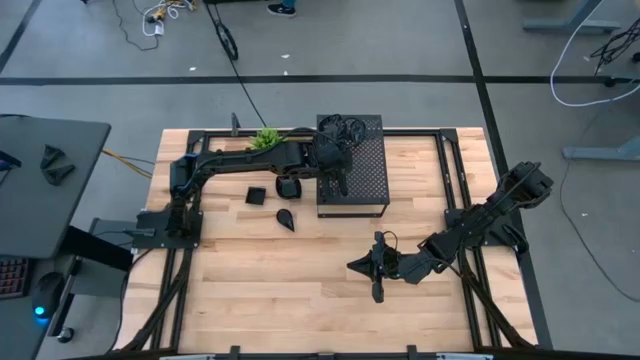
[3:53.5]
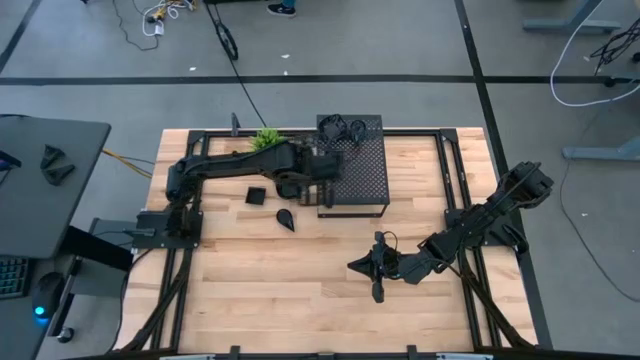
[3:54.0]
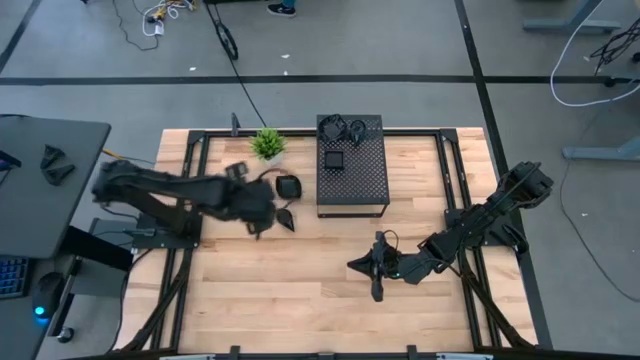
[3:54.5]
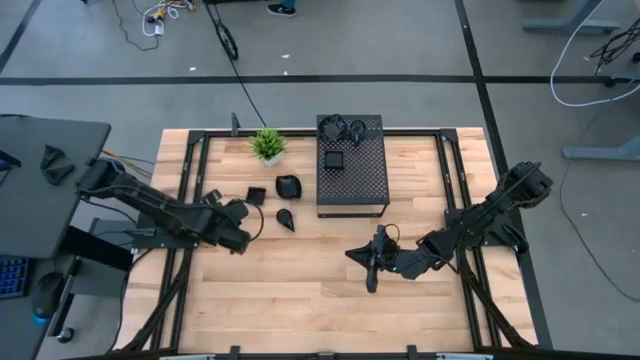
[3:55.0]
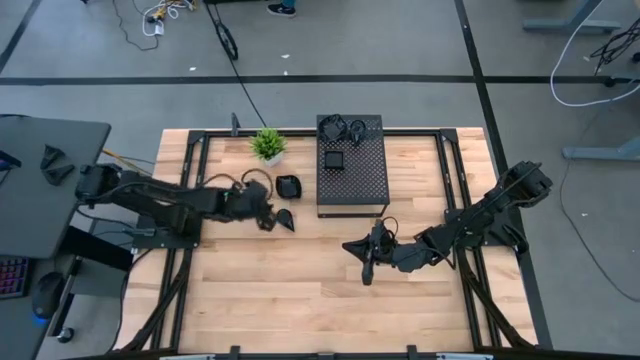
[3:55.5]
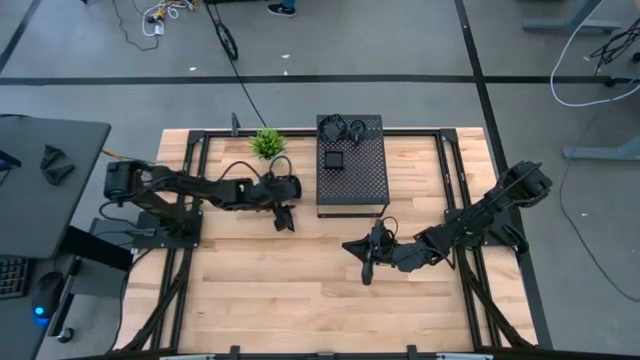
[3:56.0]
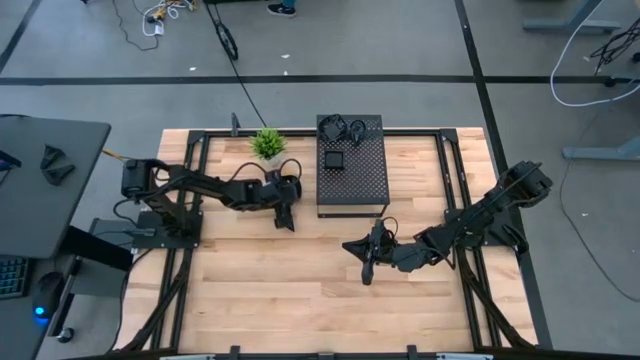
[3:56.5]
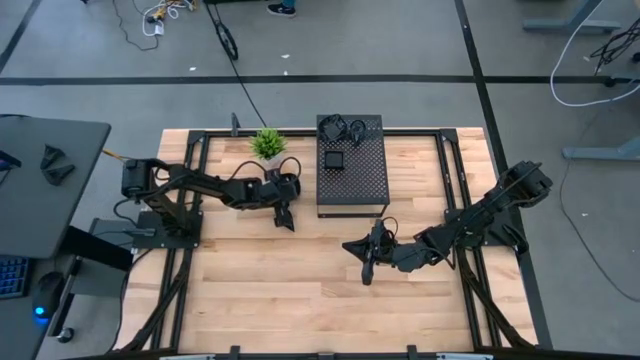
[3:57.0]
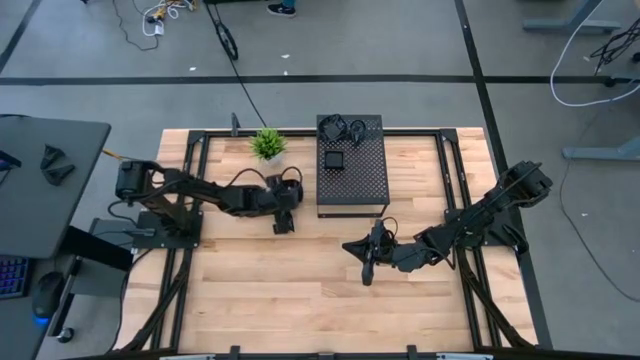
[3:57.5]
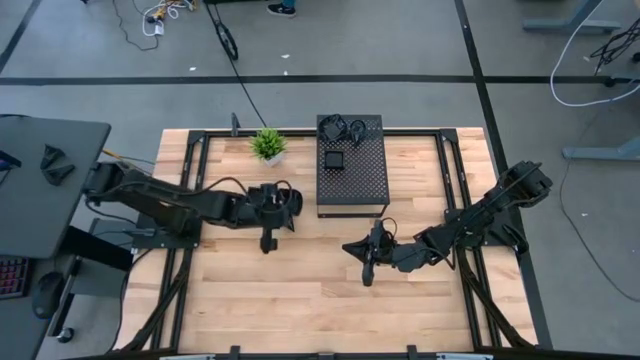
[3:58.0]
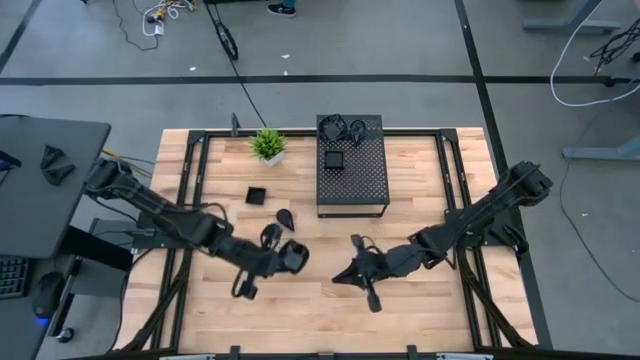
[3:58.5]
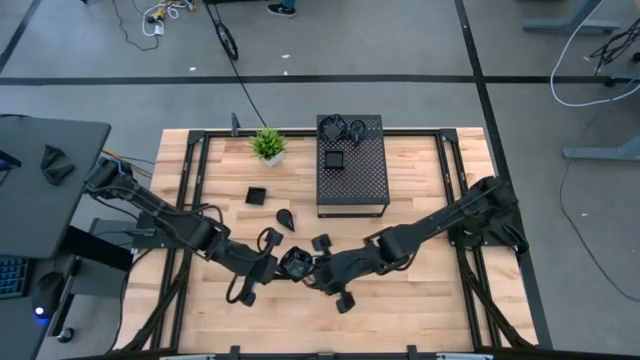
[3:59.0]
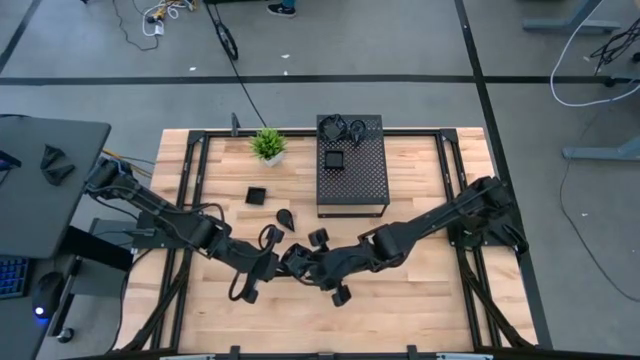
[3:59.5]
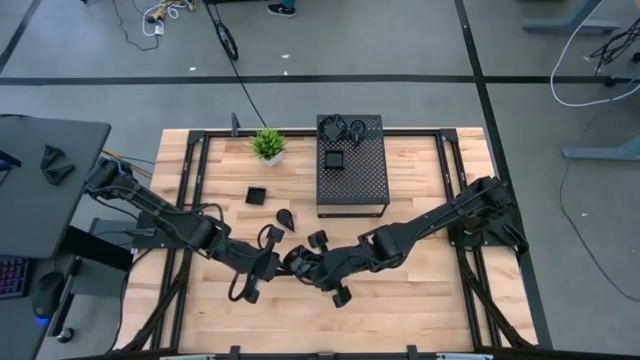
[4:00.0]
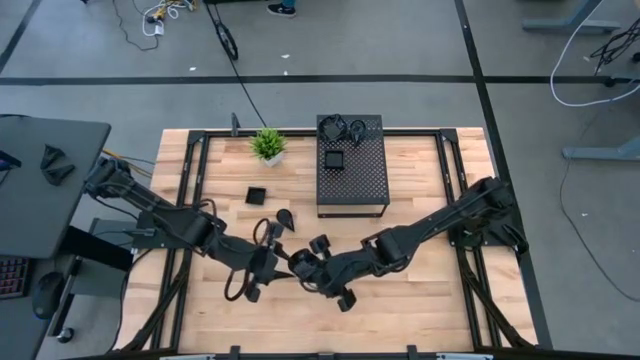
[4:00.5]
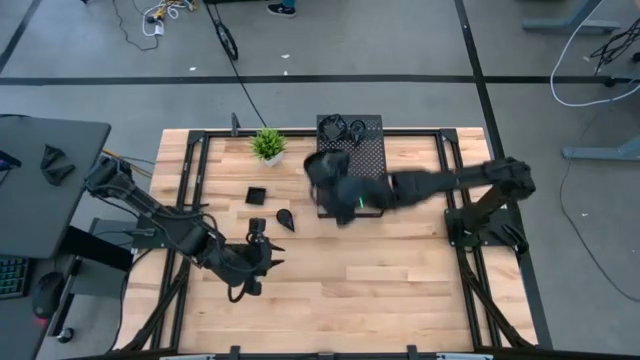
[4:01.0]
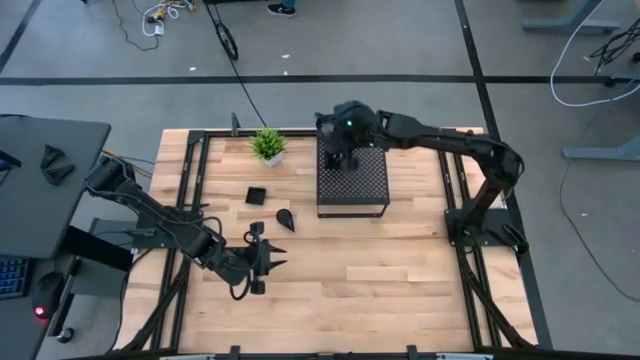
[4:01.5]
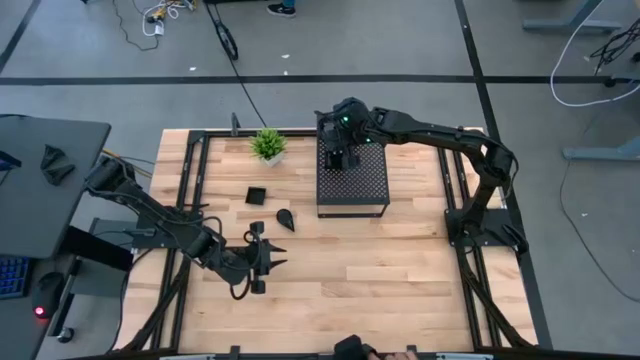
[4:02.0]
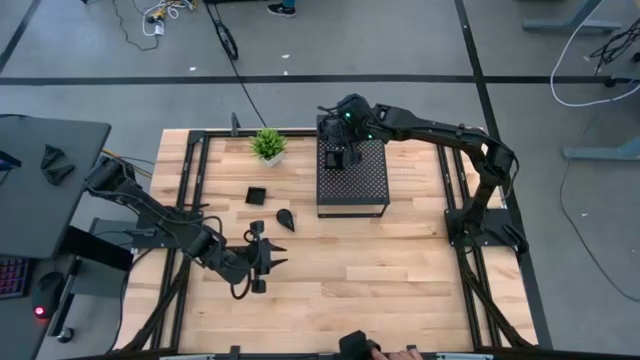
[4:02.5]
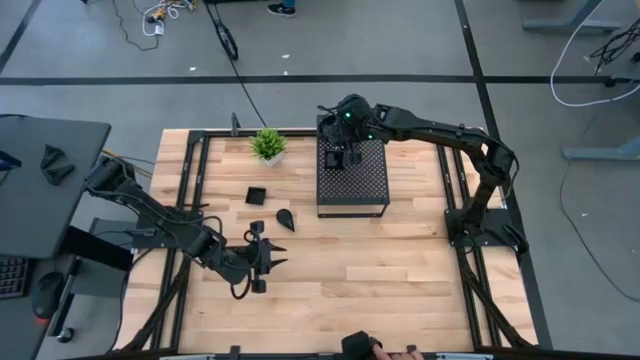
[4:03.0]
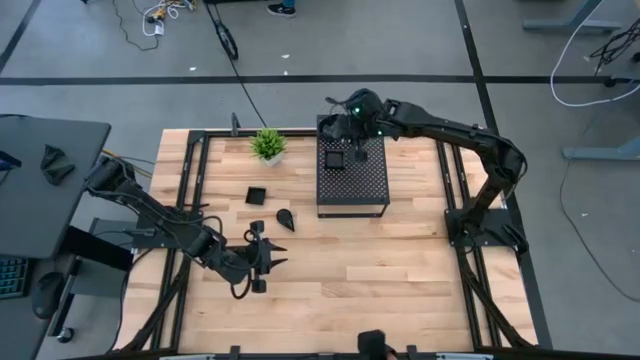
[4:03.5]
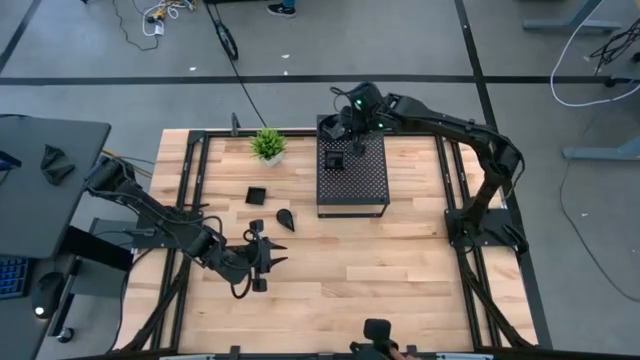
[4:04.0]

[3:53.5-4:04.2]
Task: Pick & Place Mini shaped plates
Stack the leaf shaped plate on top of the leaf shaped plate on the shelf

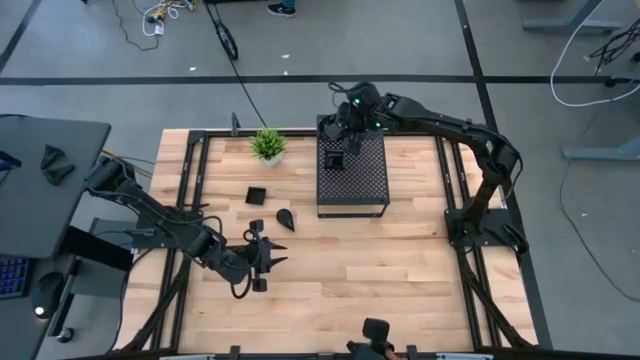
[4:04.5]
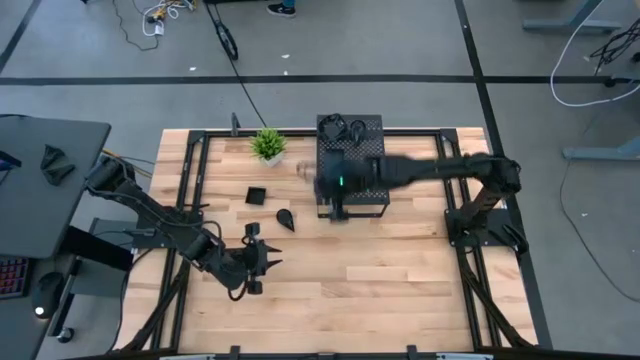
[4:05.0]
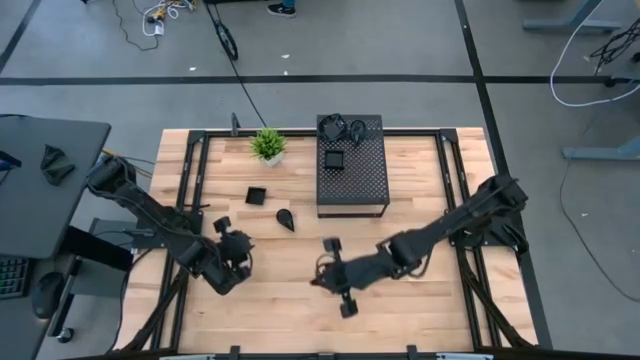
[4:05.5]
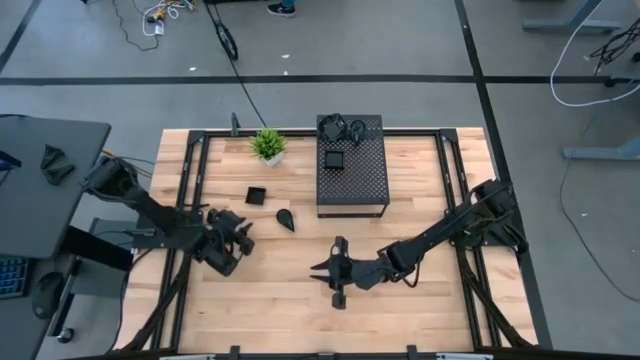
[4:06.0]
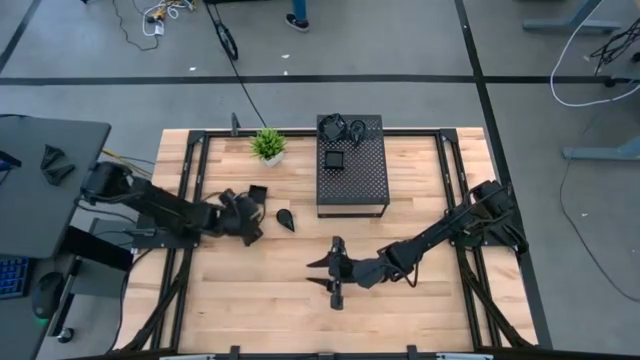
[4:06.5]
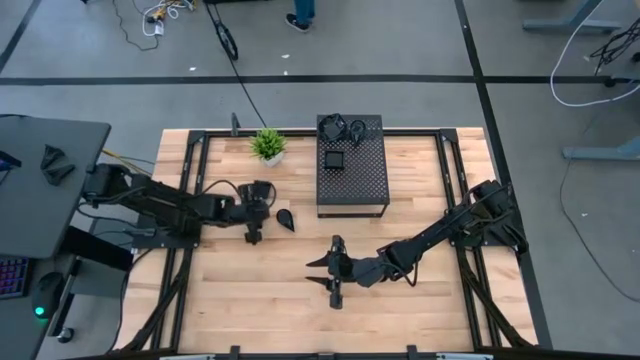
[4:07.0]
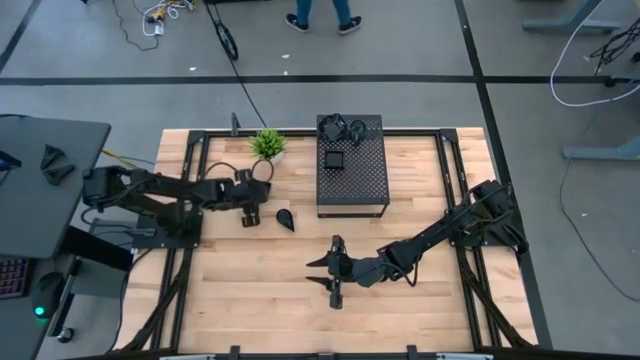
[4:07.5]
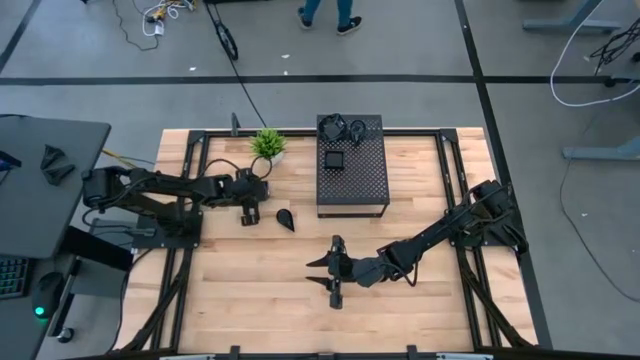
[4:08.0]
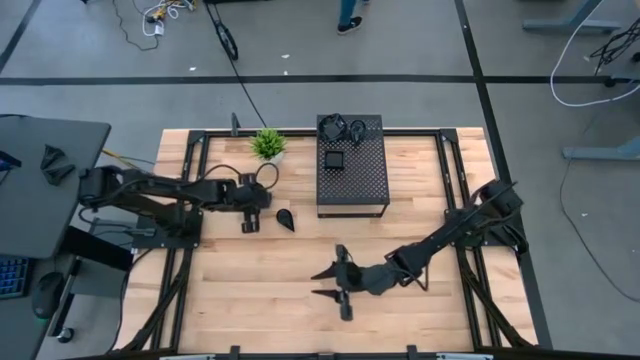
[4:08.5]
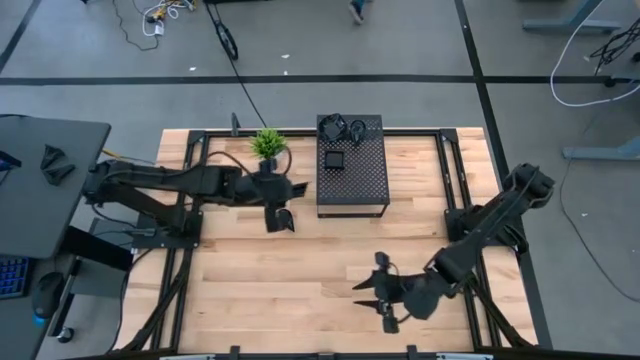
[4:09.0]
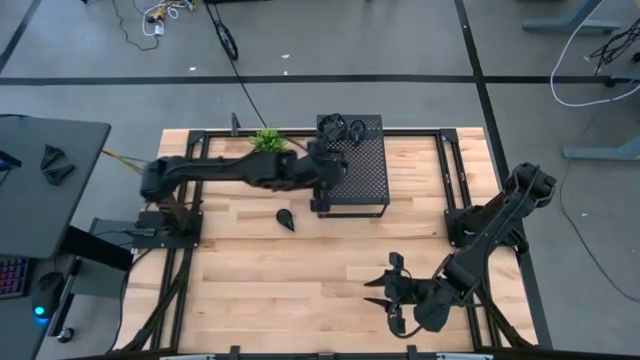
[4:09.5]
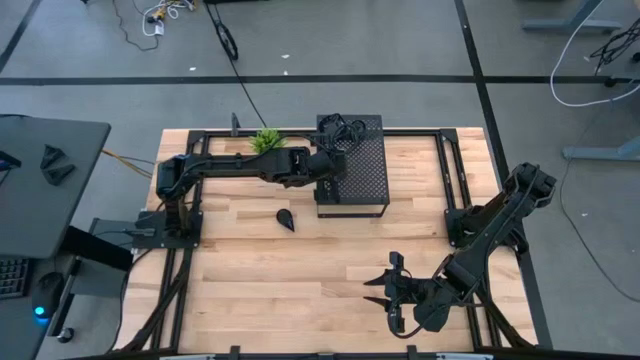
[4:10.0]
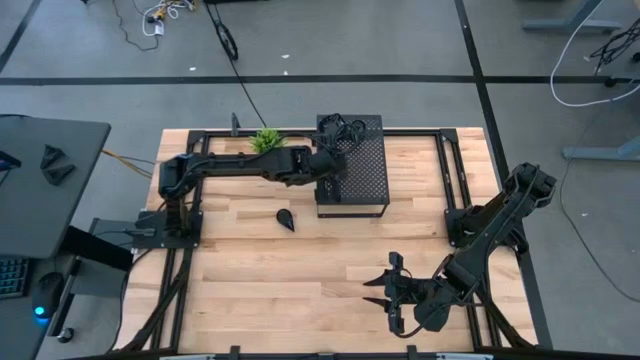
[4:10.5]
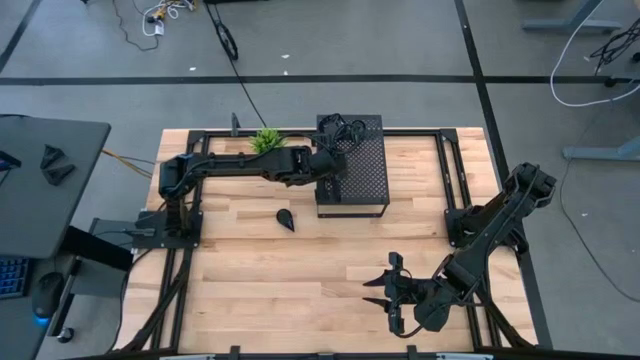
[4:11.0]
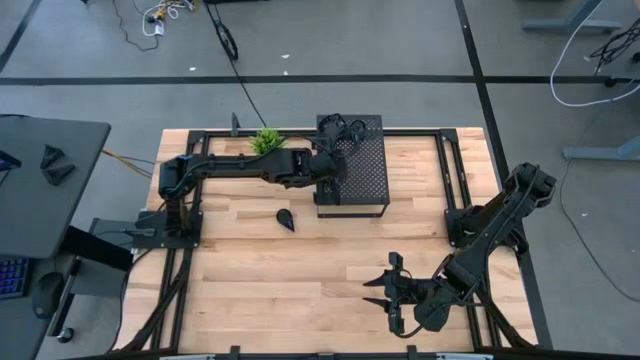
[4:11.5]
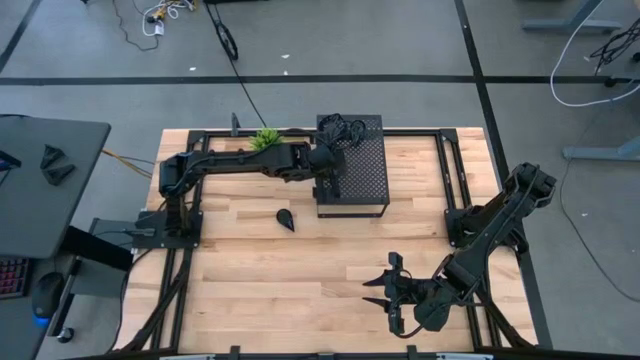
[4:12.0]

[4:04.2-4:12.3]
Stack the square plate on top of the square plates on the shelf

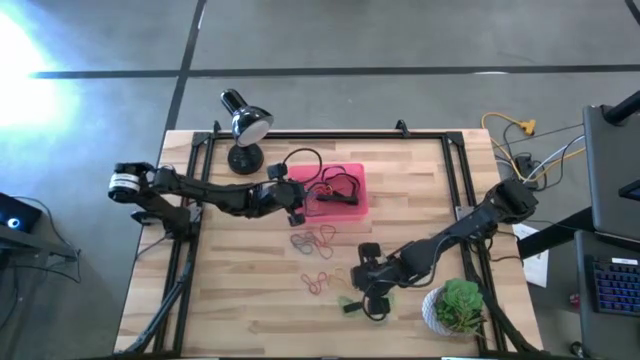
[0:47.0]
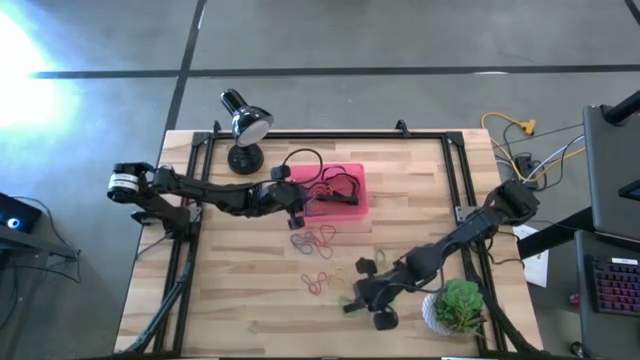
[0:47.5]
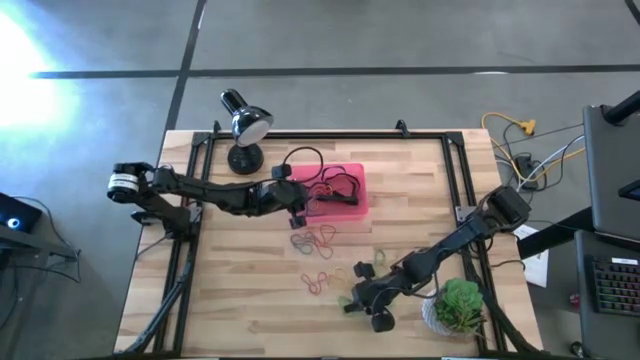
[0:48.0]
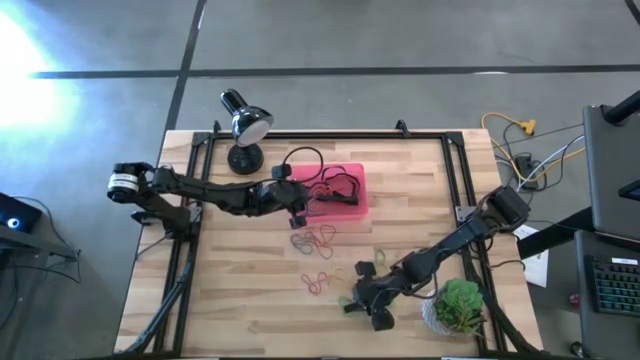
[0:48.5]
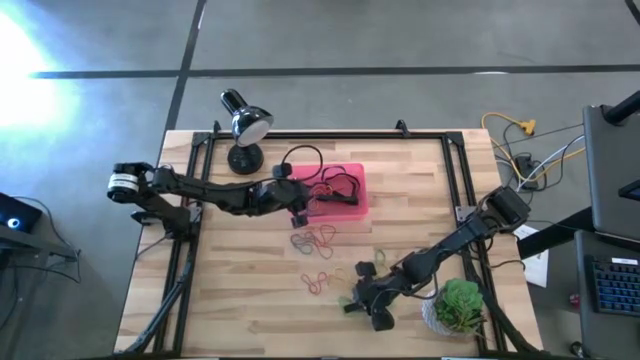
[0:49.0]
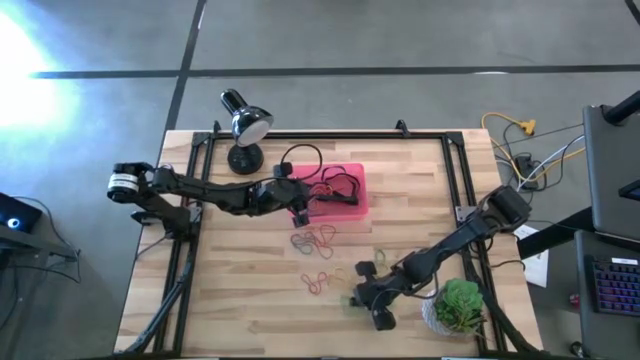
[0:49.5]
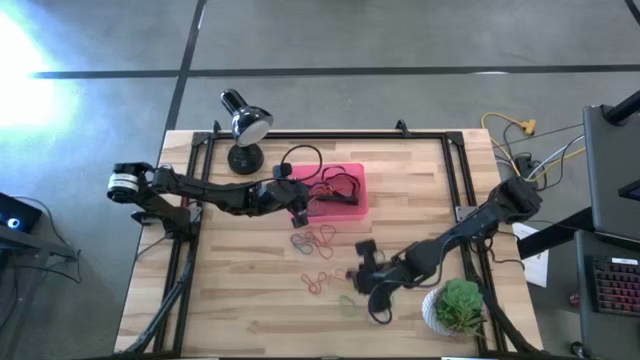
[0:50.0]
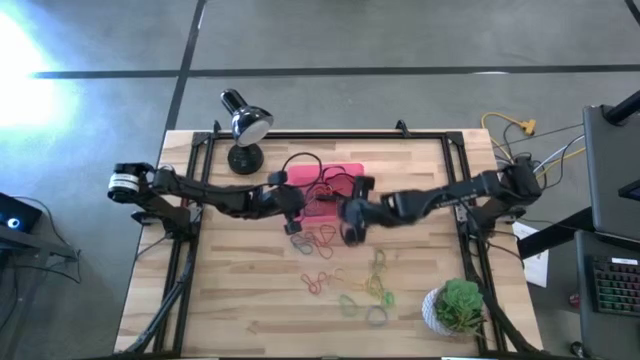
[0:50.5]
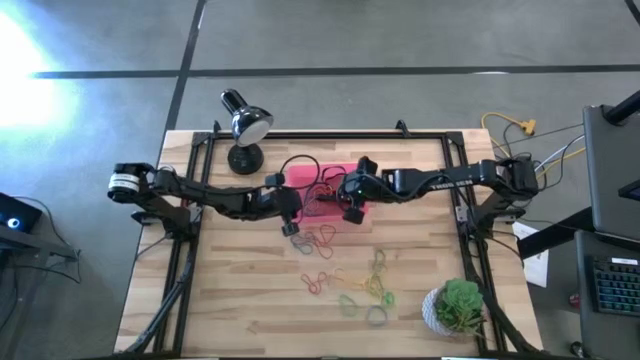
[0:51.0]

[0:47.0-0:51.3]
Task: Pick and place rubber bands into bin
Put the black rubber band into the red bin
